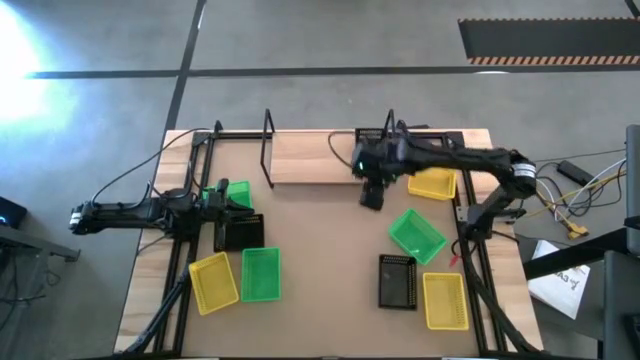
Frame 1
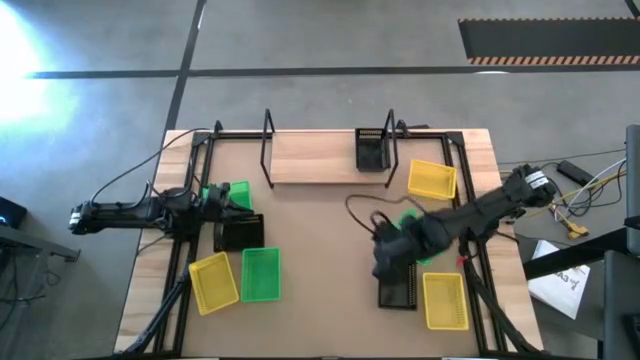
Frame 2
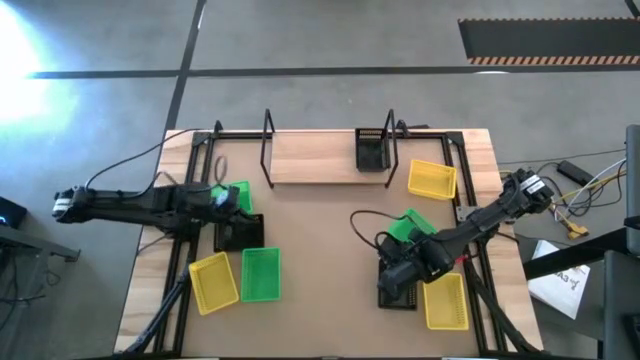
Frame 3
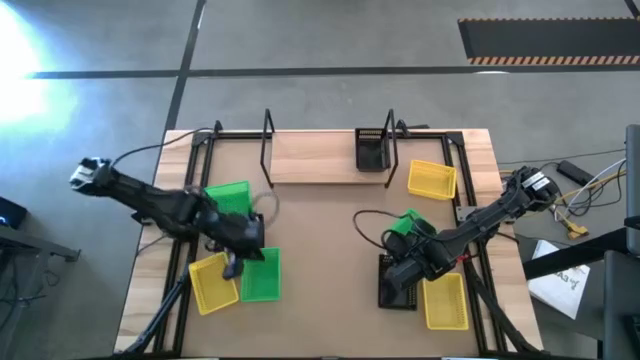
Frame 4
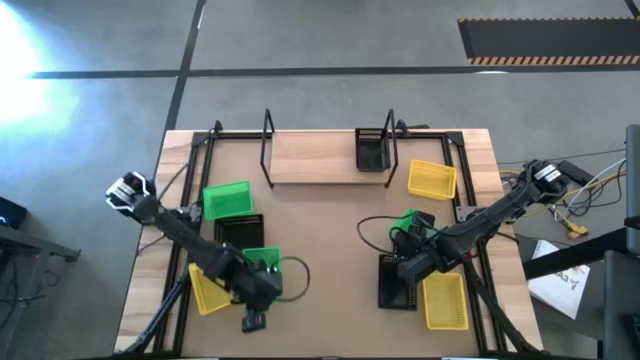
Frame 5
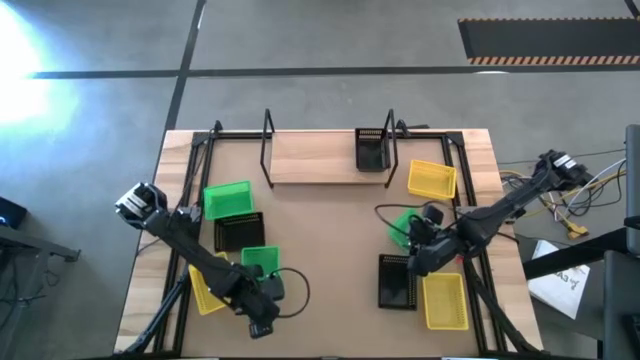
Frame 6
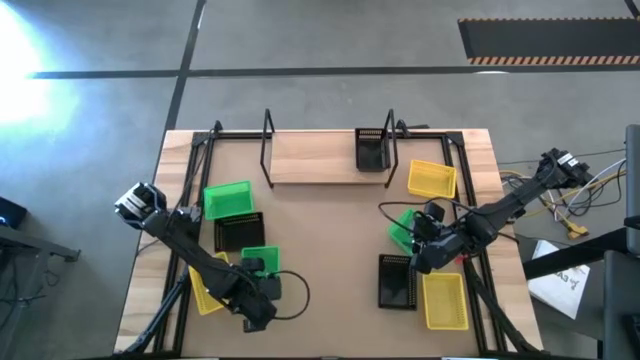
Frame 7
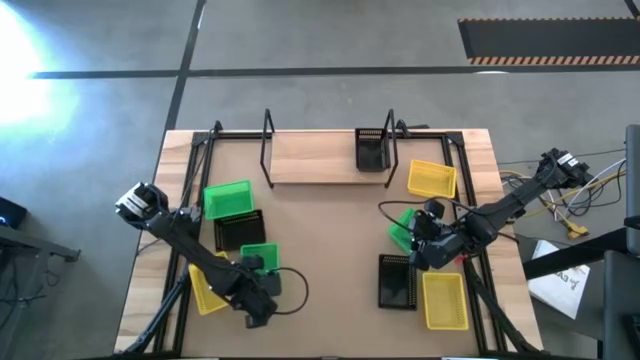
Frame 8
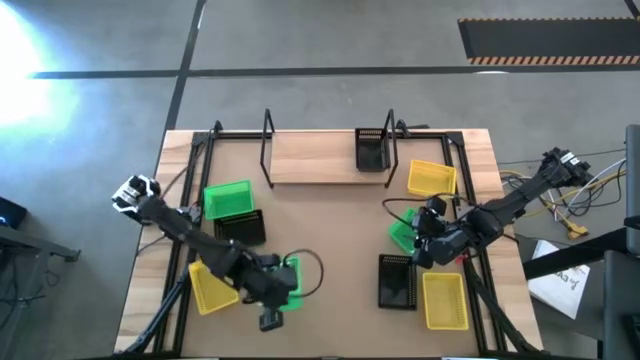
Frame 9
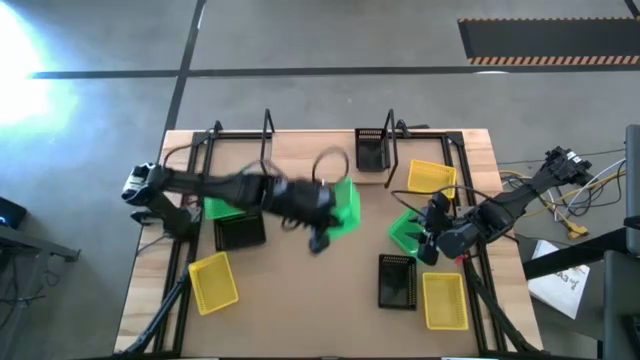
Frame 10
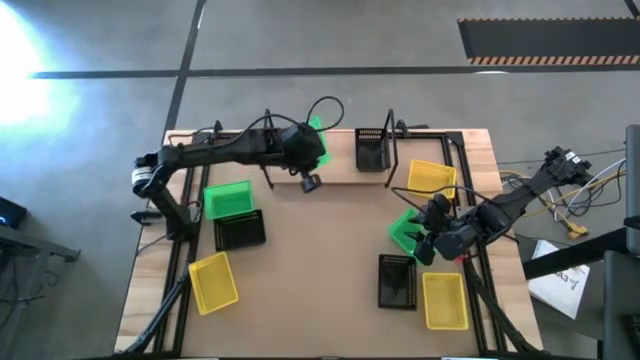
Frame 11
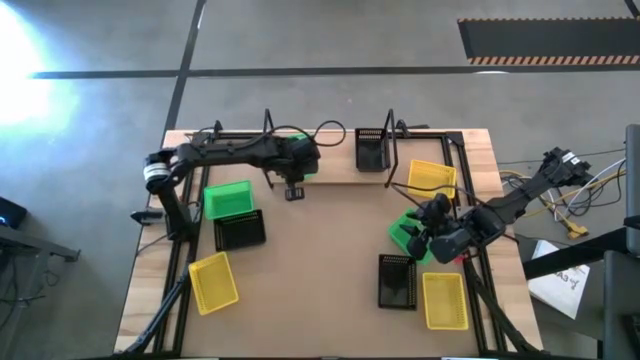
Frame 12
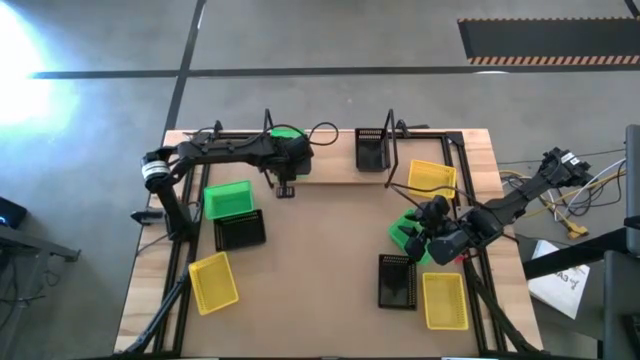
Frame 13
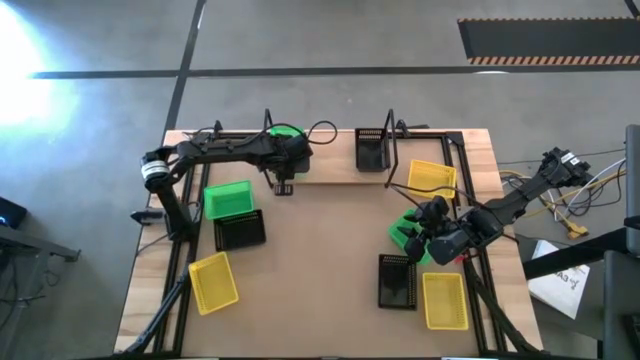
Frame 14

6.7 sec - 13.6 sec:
Task: Stack baskets on shelf by color
Put the bottom left green bin on the shelf

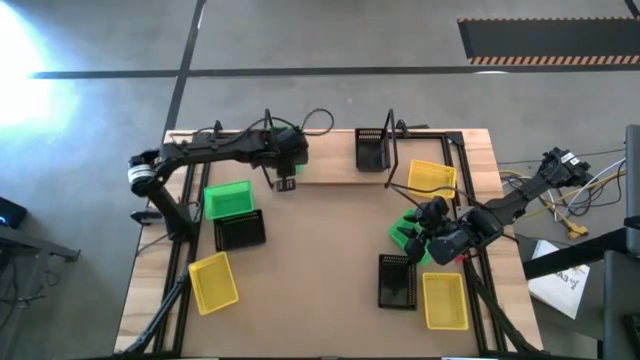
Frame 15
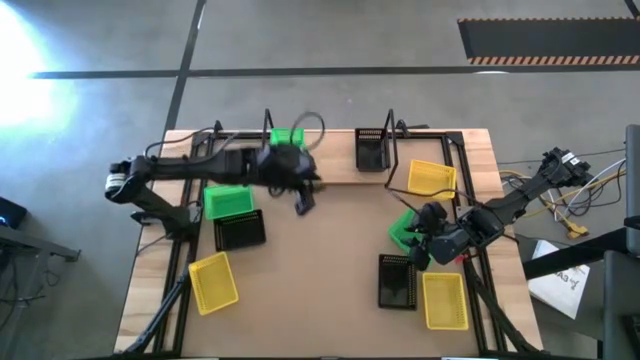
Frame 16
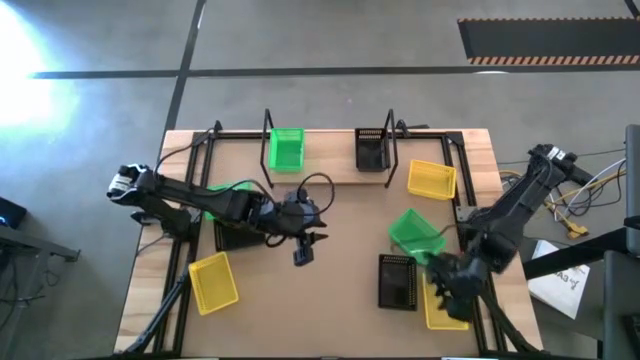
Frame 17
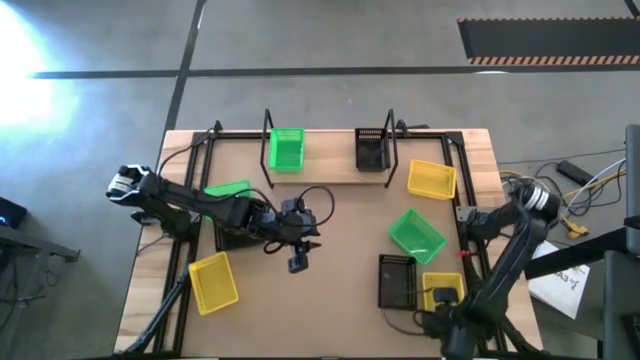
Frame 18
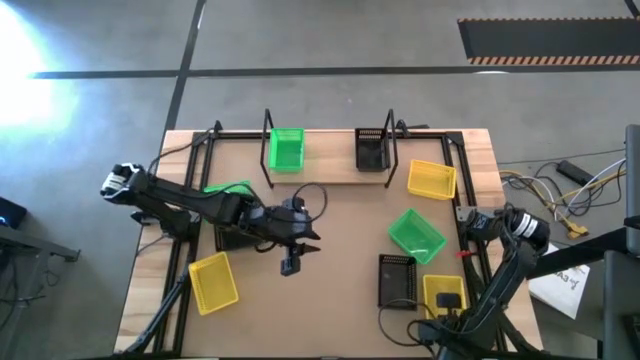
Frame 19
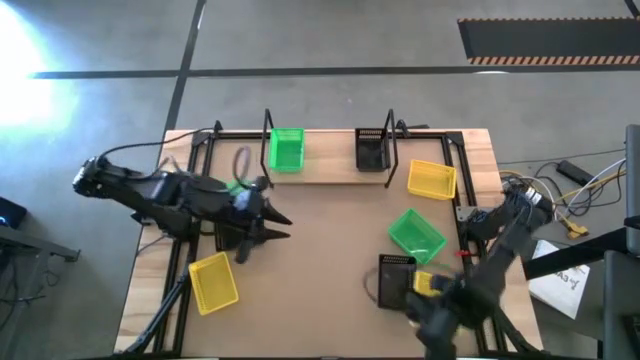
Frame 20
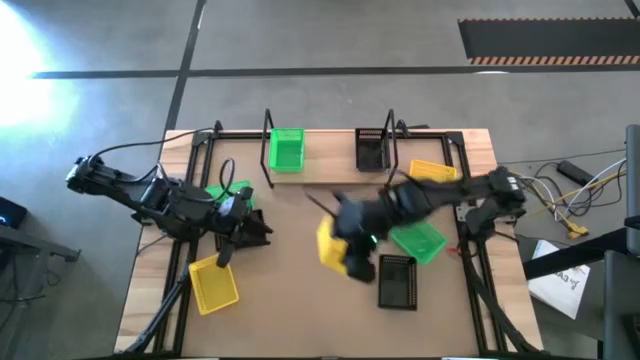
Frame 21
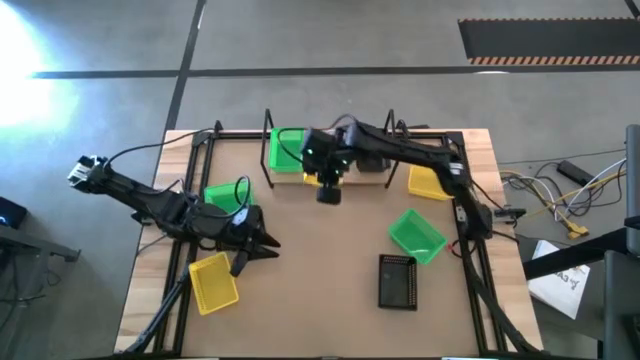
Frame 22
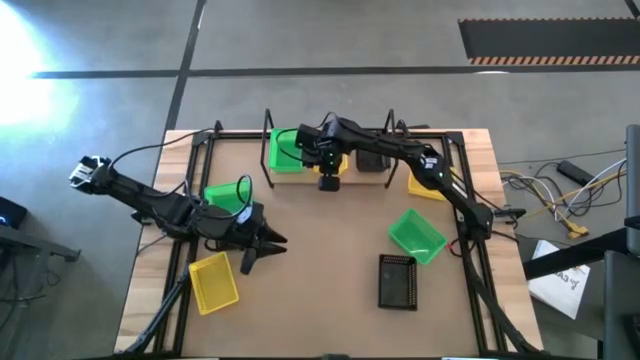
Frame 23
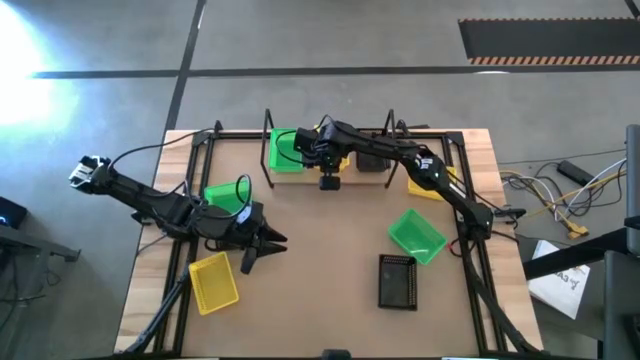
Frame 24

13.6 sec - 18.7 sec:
Put the bottom right yellow bin on the shelf

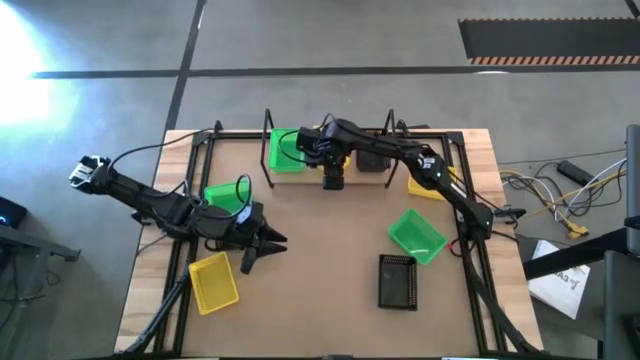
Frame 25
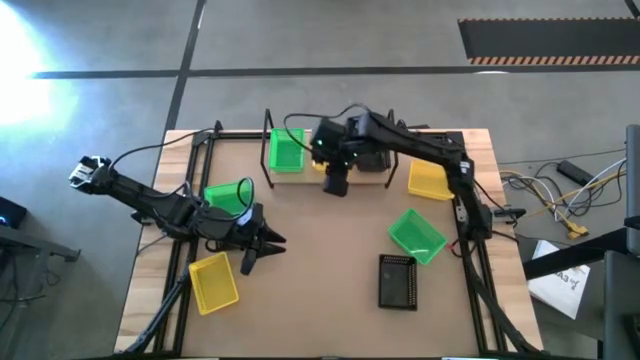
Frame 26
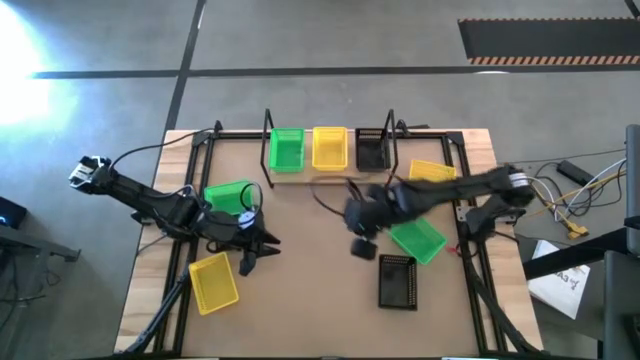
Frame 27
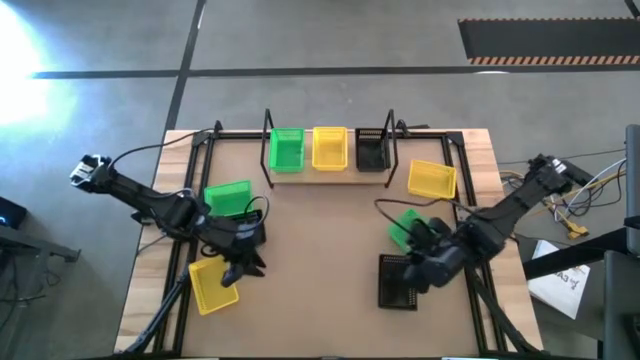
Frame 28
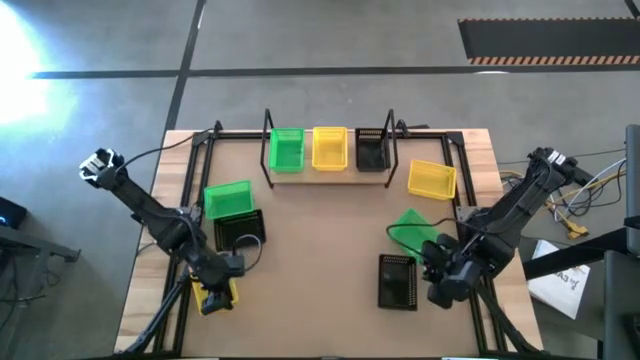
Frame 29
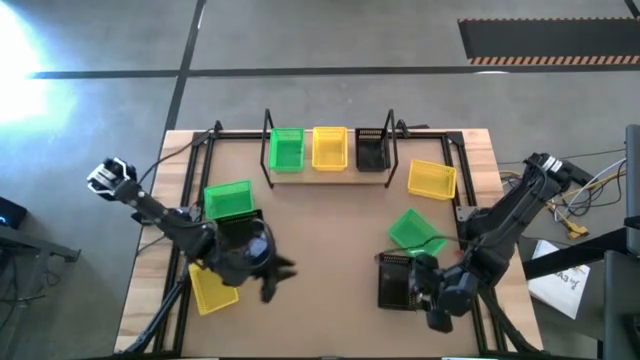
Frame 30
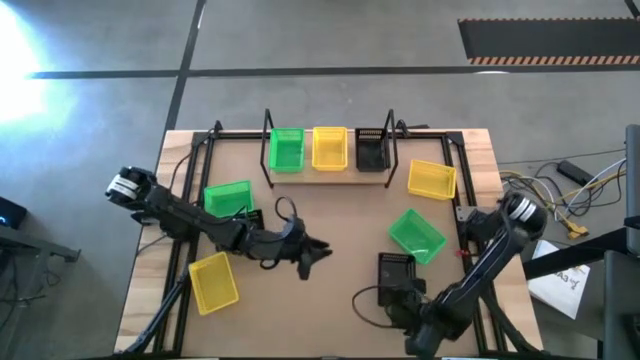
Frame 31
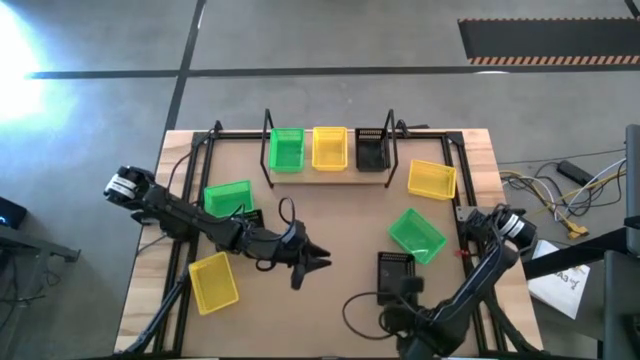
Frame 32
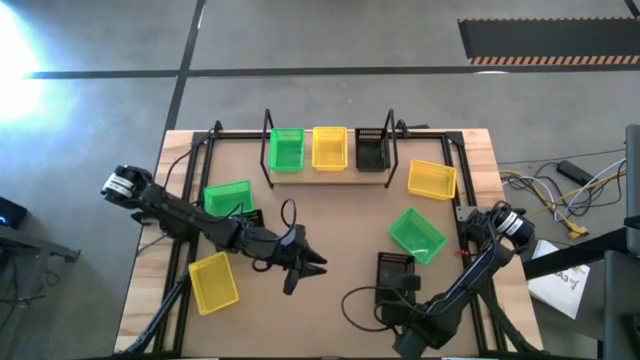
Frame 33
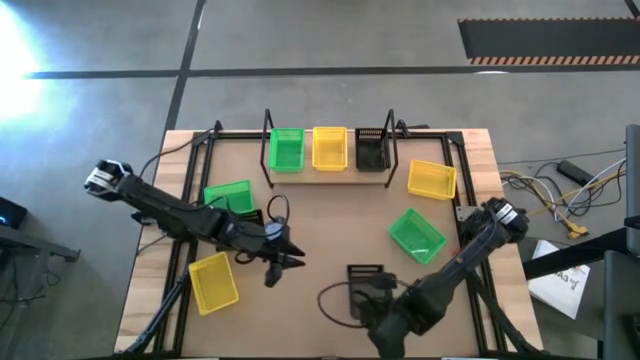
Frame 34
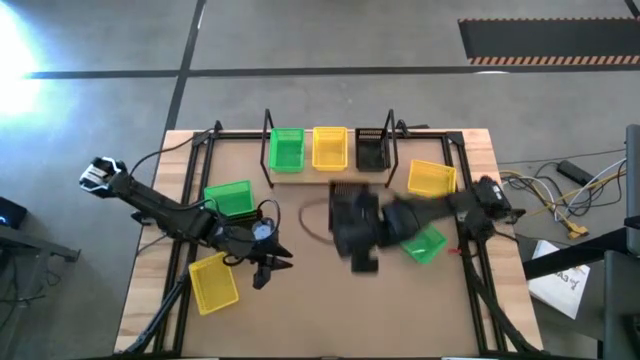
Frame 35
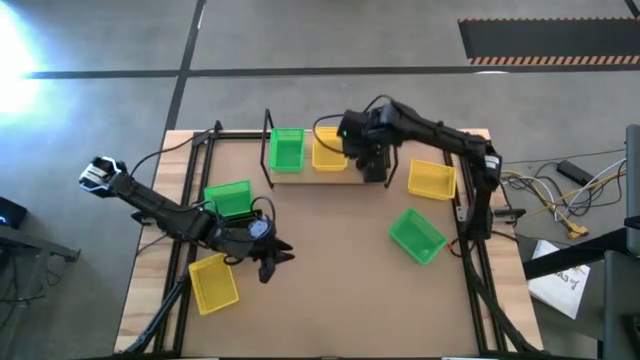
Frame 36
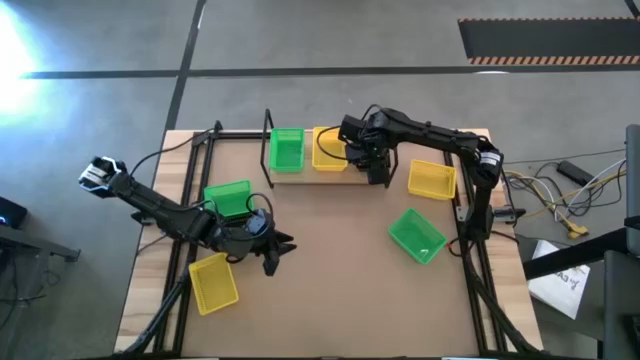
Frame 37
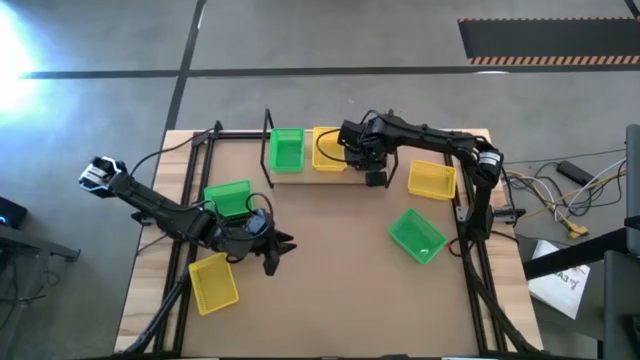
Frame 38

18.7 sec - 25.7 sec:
Stack the right black bin on top of the other black bin on the shelf

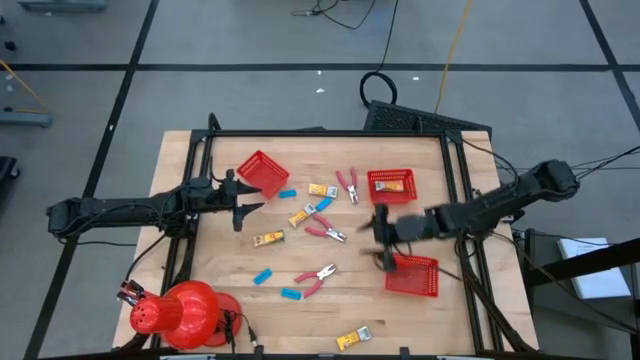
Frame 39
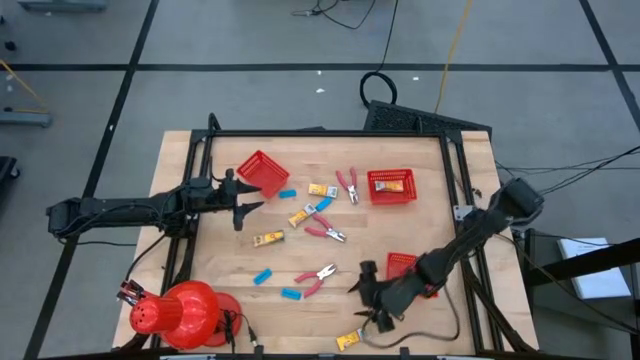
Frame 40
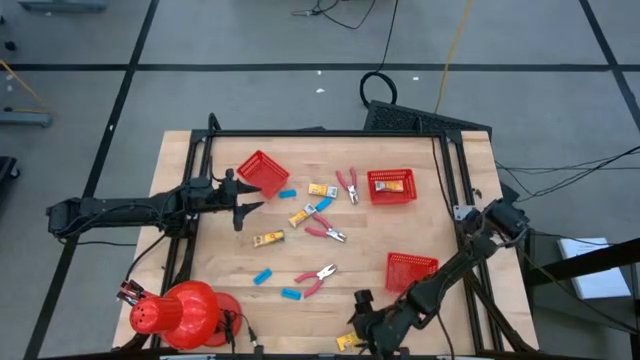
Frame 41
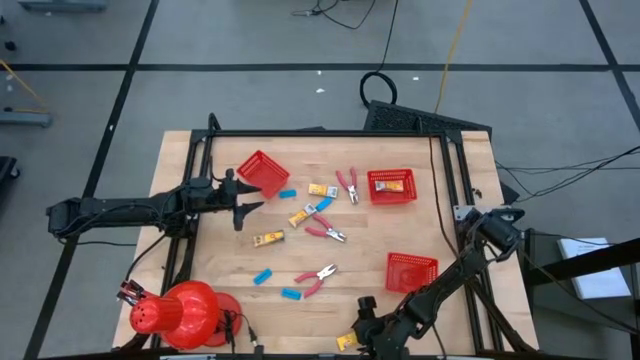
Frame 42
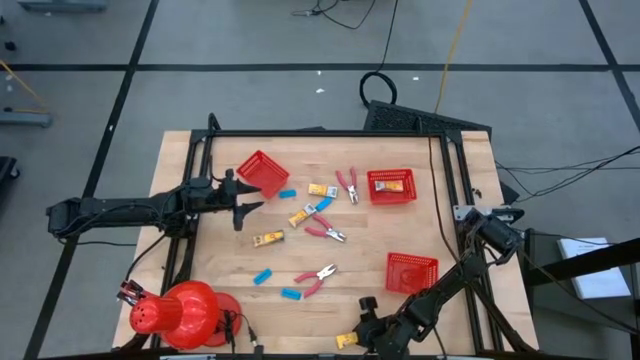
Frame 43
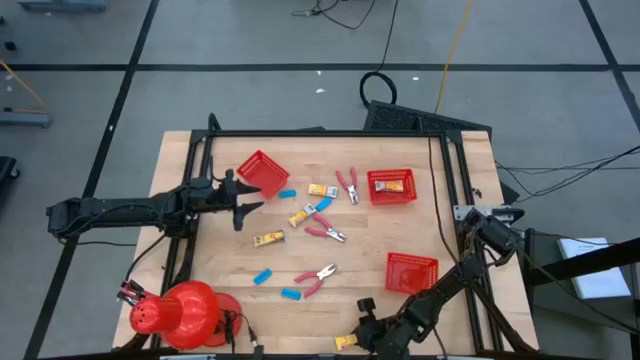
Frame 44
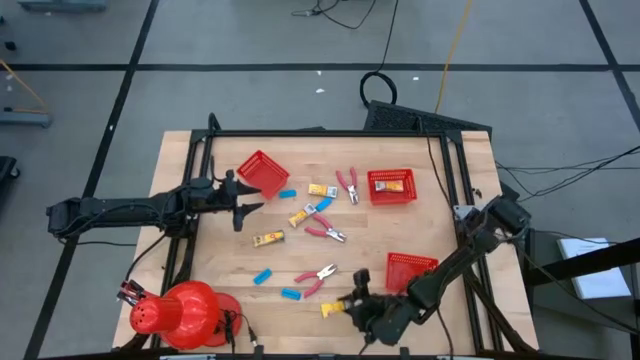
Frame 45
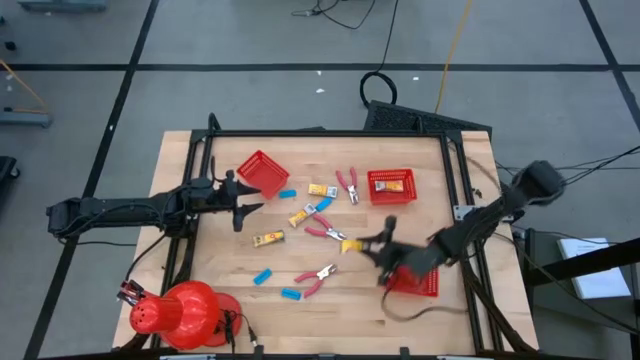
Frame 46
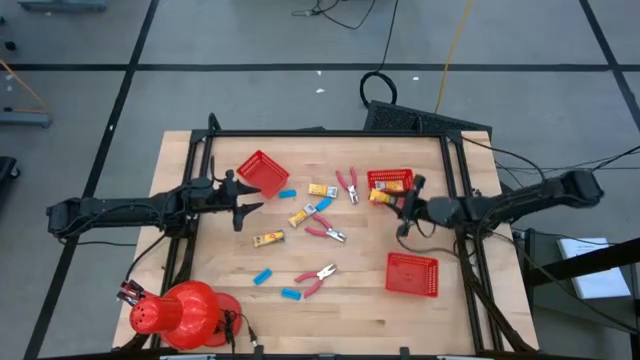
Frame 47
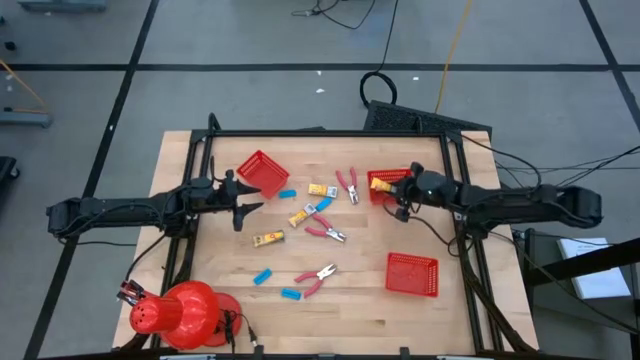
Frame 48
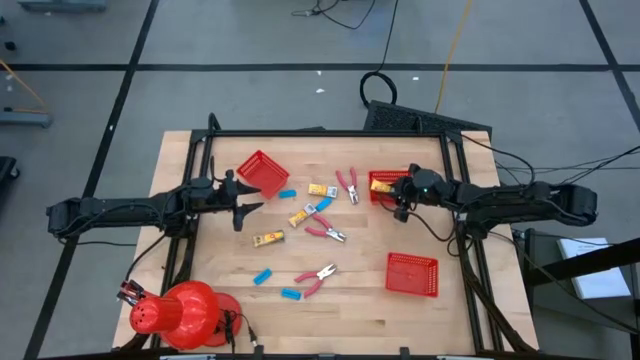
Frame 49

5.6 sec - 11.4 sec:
Task: Pick & Place School Supplies
Put the yellow crayon box into the top right red bin
